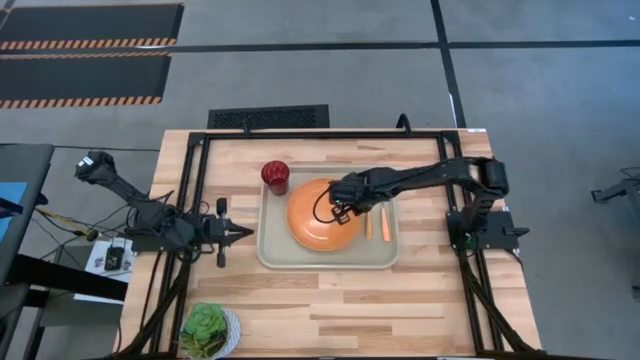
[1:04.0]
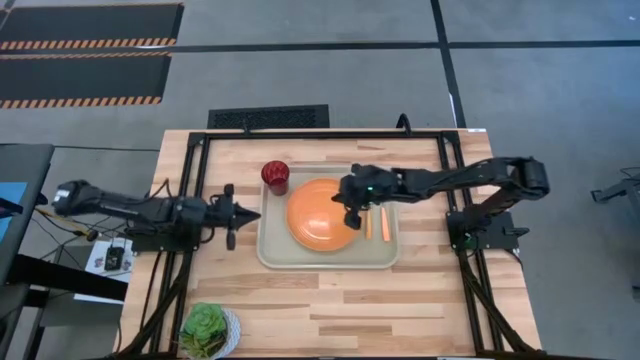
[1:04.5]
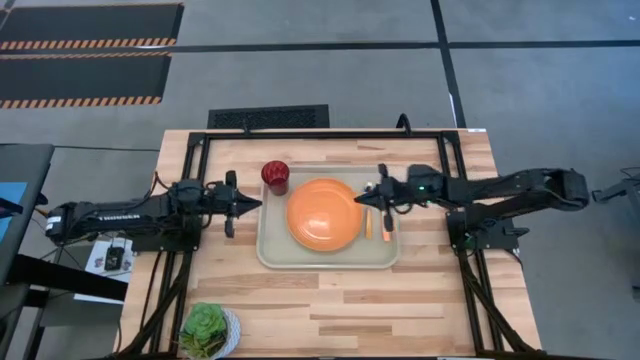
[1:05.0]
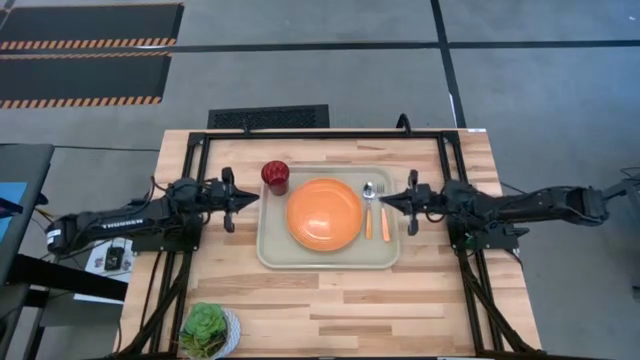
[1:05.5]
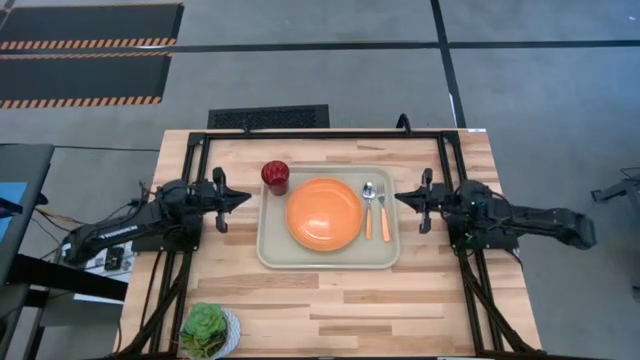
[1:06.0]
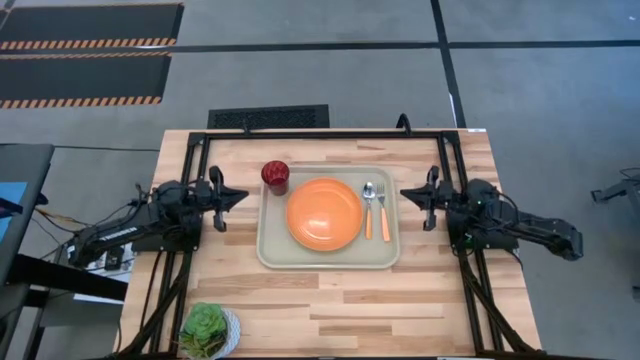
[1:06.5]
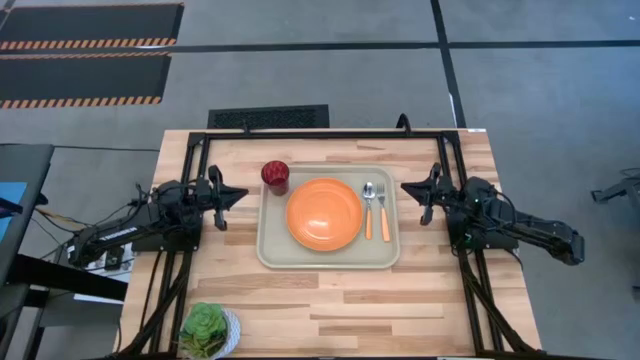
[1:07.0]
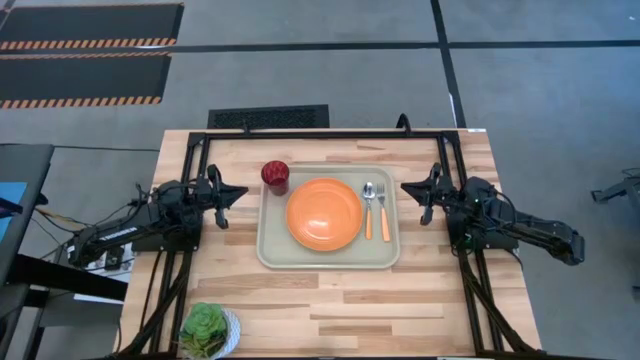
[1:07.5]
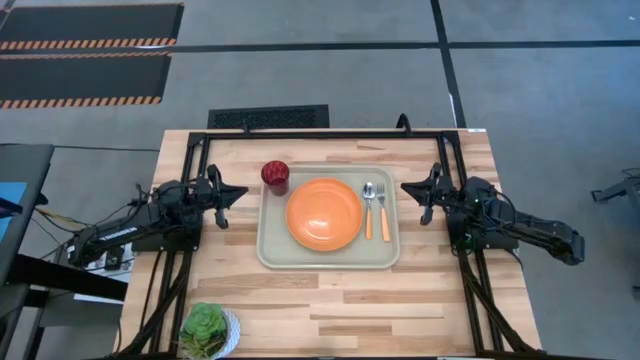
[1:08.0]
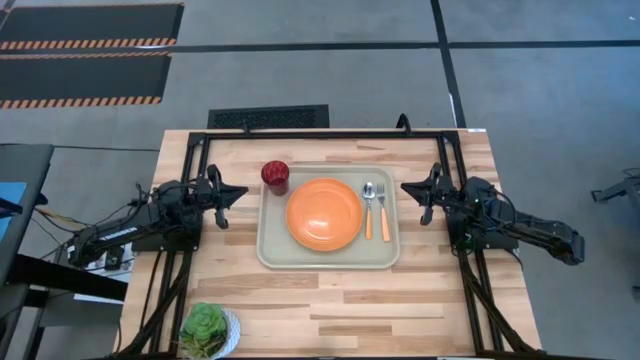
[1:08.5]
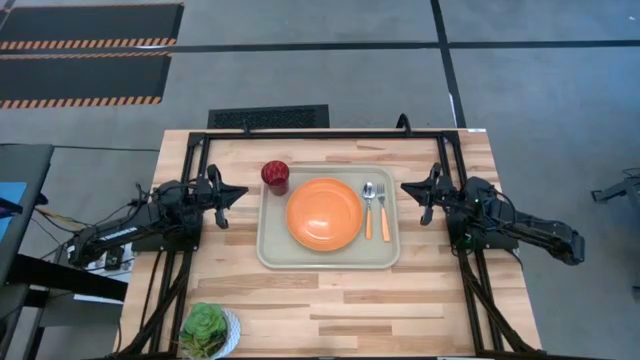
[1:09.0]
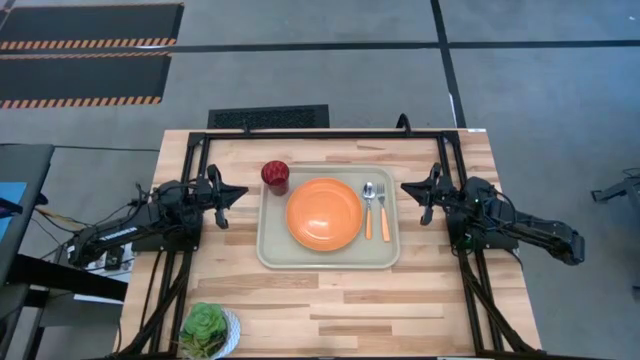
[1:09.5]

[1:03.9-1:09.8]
Task: Pick and place plate/cup/fork/spoon on tray
Return to Home Position

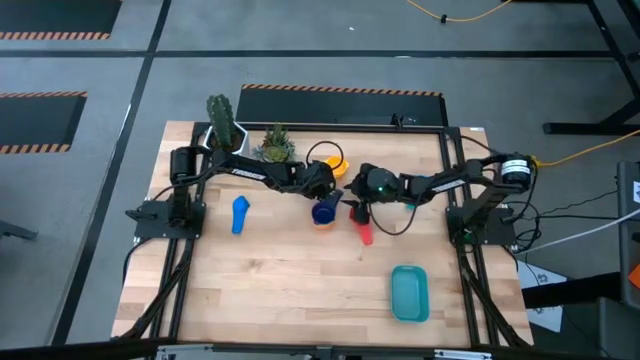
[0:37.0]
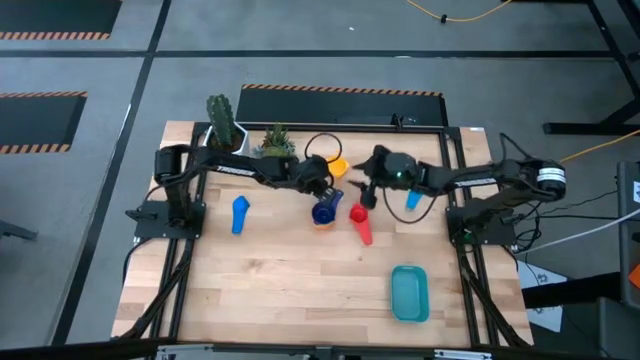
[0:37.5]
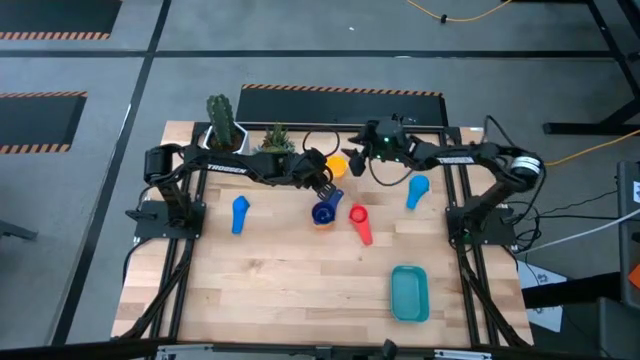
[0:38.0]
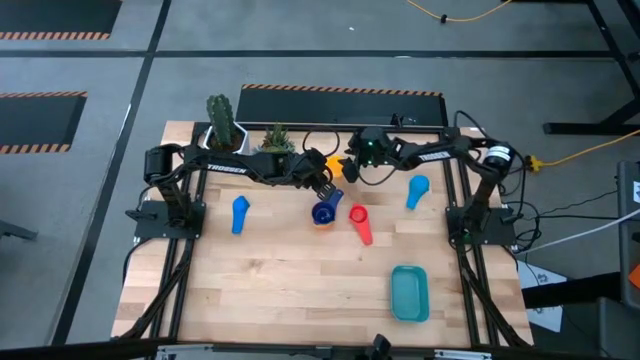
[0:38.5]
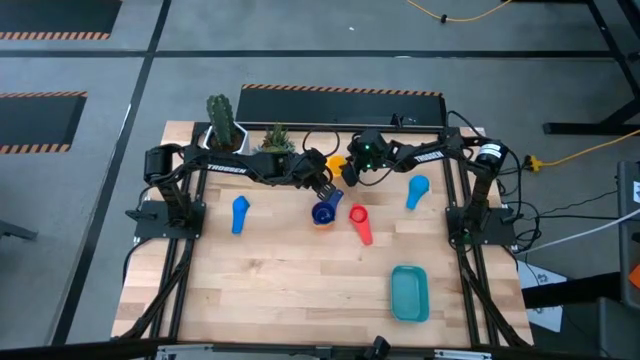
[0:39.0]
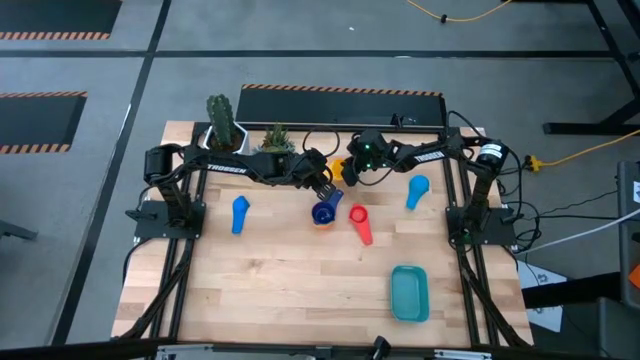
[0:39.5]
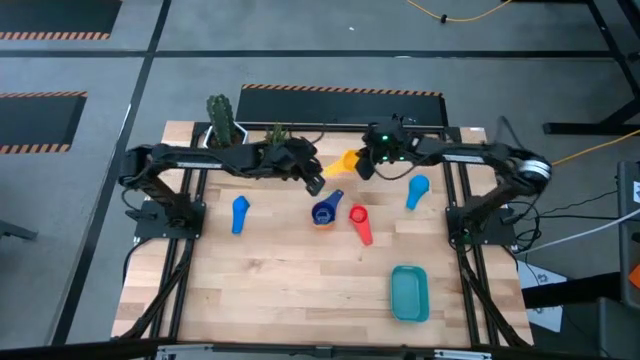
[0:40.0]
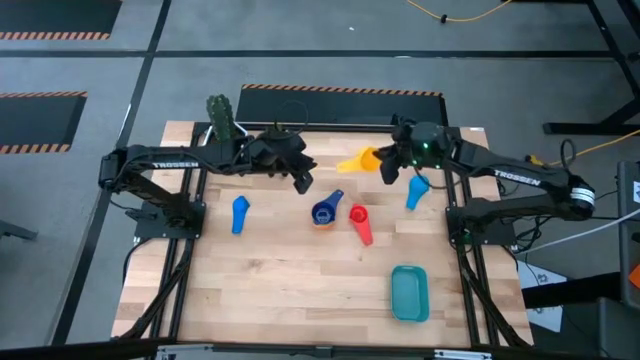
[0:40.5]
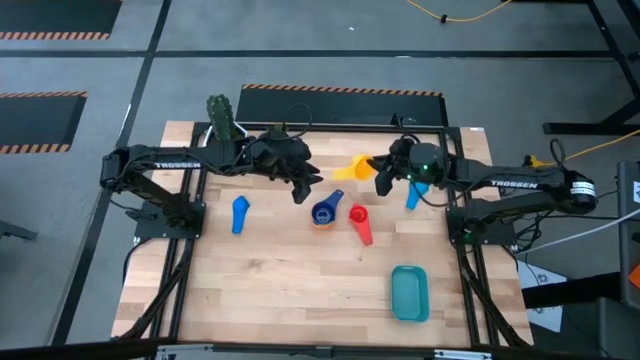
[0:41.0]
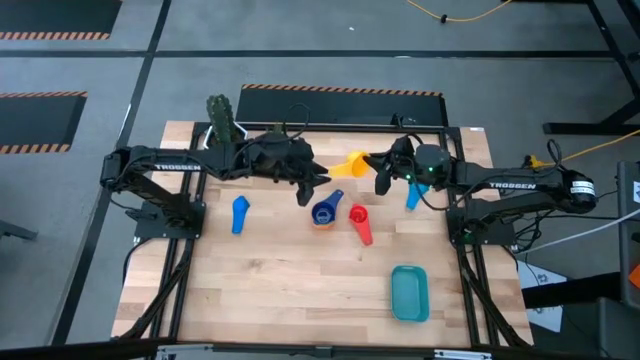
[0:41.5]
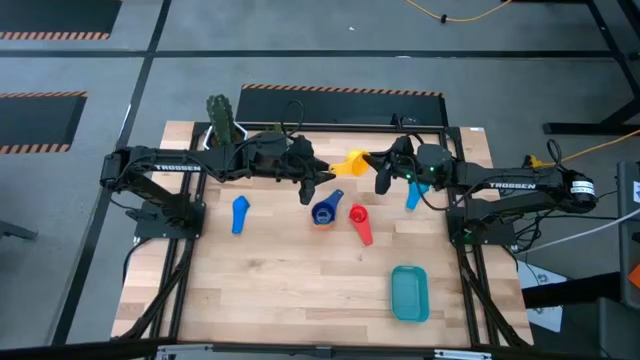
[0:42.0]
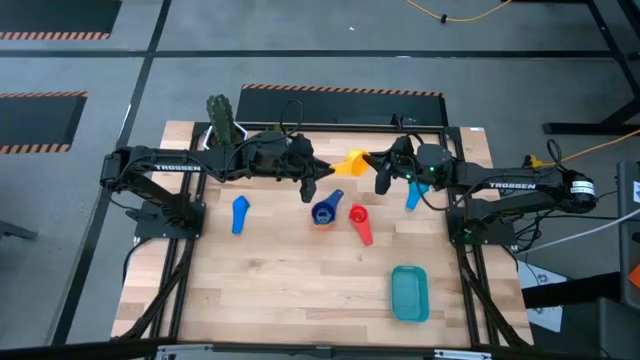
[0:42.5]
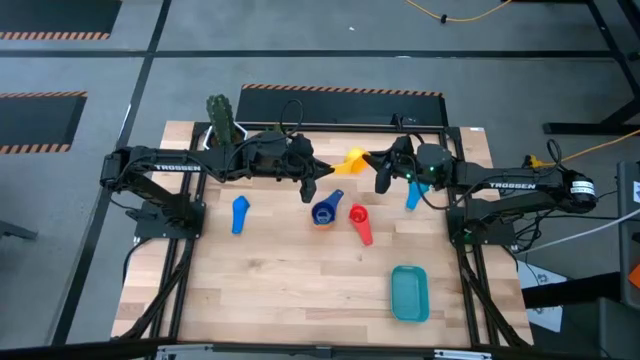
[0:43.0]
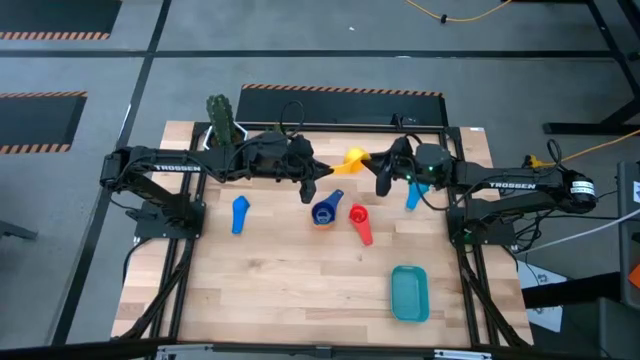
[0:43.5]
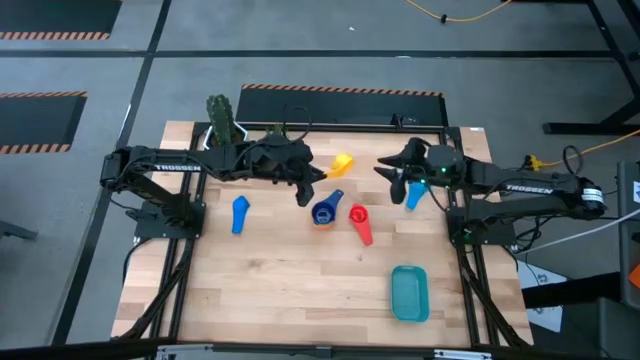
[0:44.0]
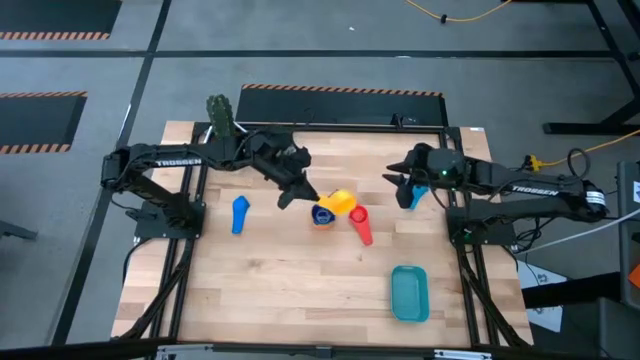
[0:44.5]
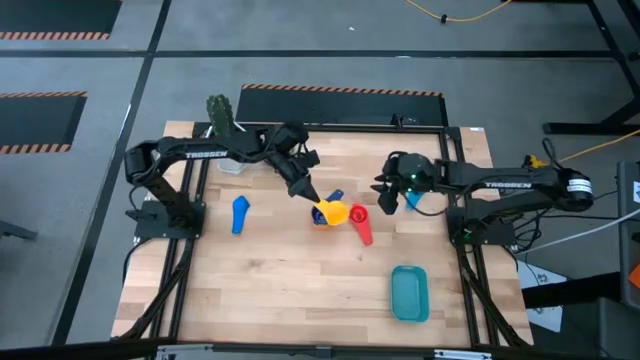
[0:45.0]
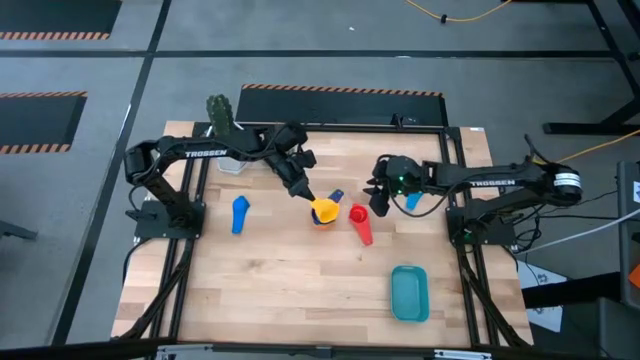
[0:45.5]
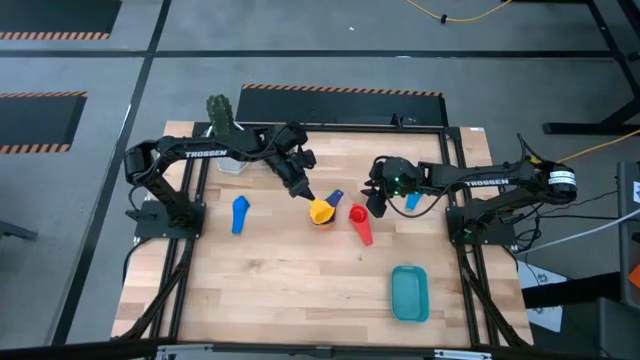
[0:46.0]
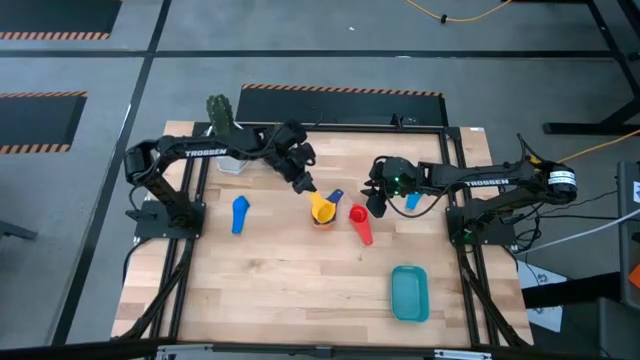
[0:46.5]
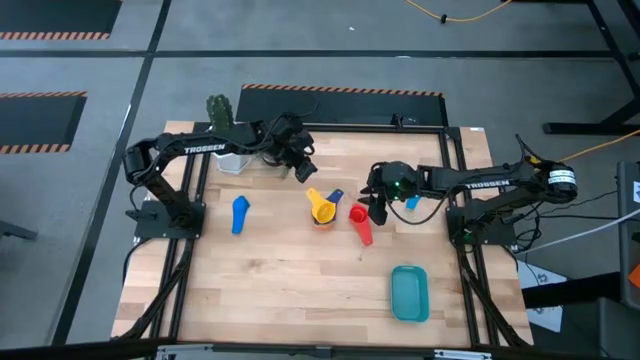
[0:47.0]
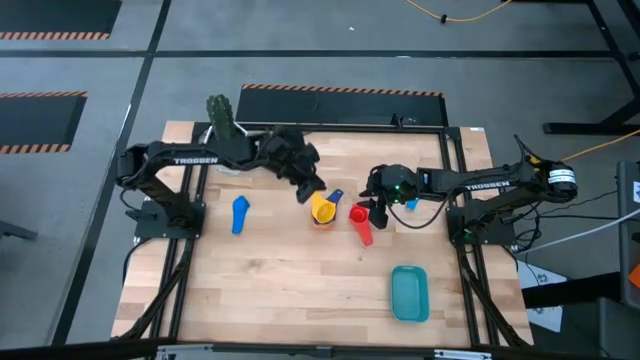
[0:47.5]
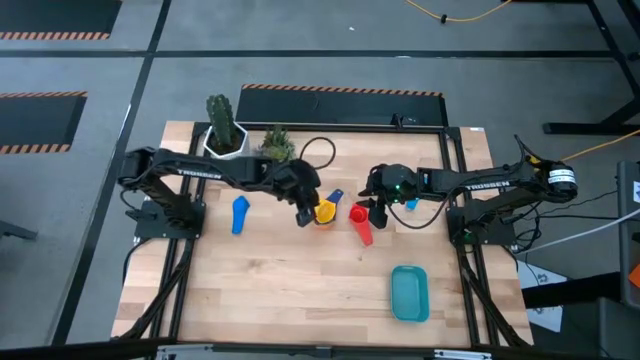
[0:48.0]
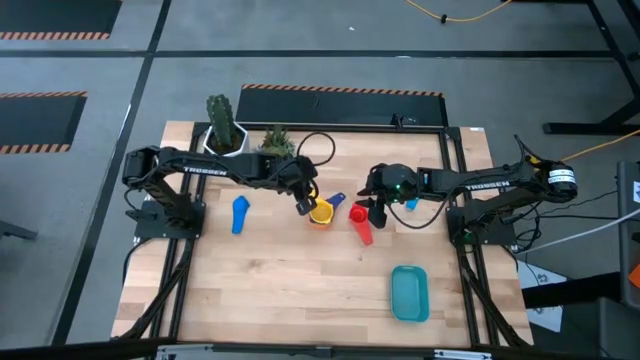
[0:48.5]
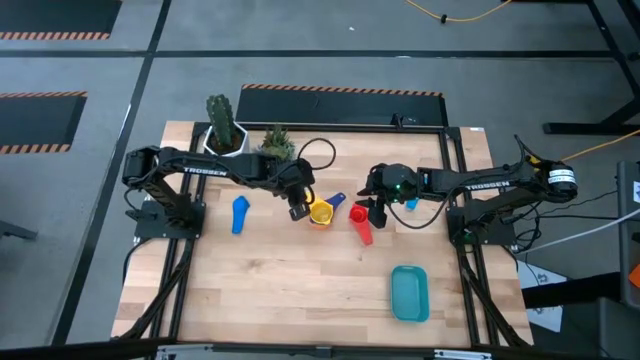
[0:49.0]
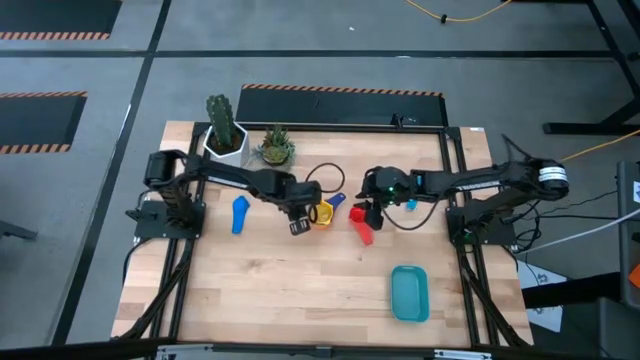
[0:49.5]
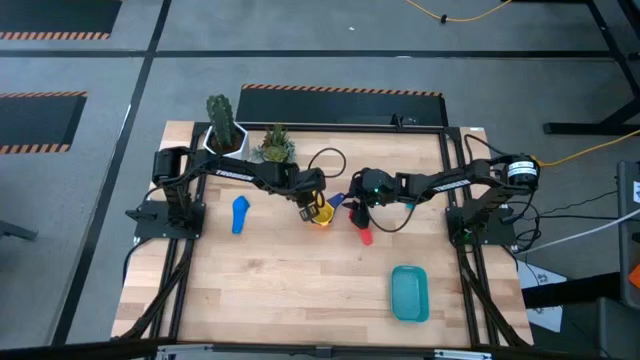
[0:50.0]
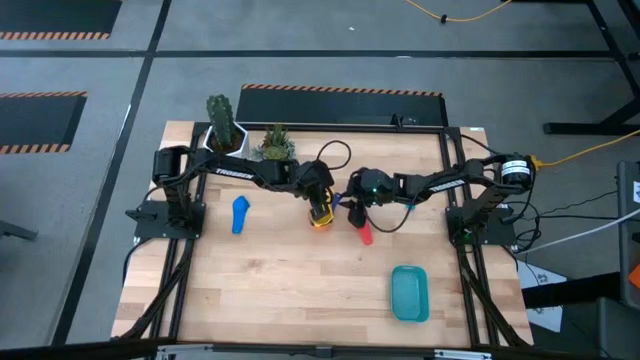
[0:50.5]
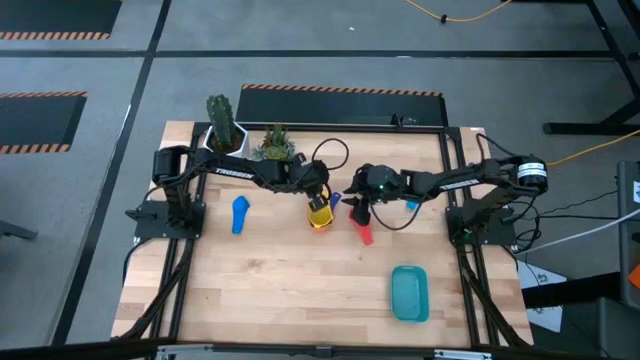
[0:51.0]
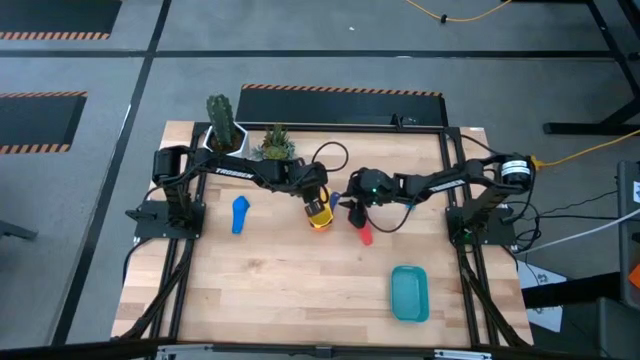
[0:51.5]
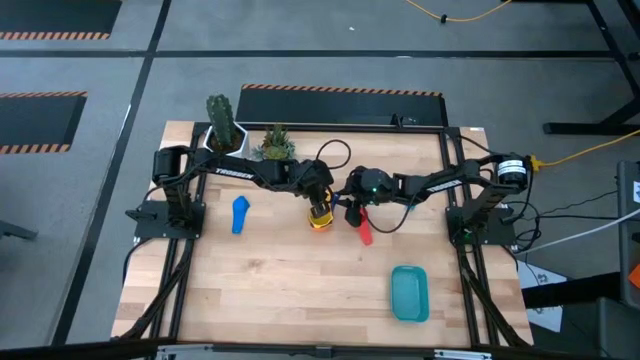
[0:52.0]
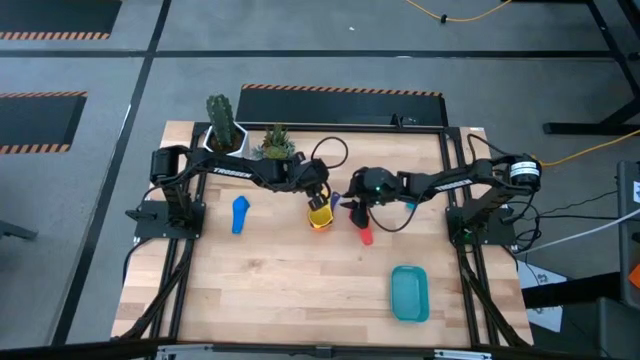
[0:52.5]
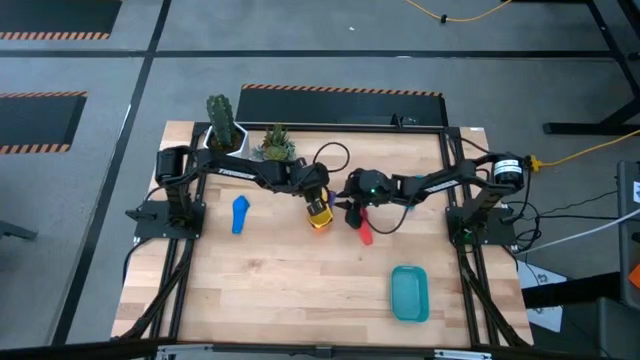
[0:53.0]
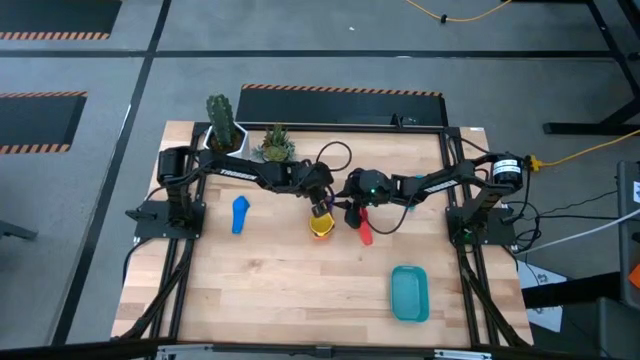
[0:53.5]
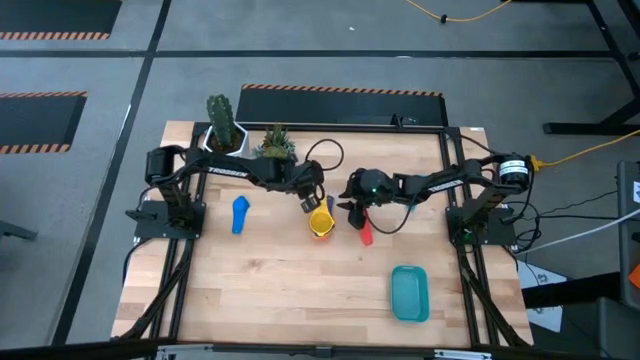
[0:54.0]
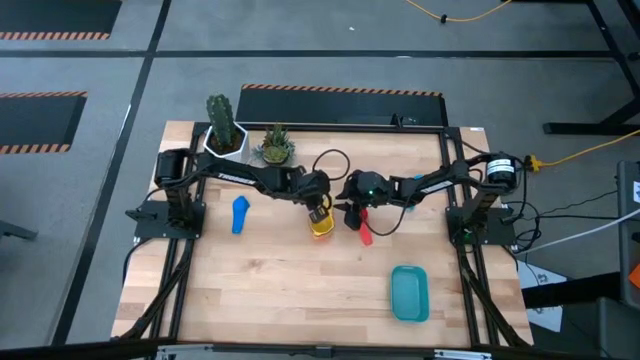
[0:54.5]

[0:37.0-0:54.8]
Task: Nest measuring cups in basket
Stack the yellow measuring cup on top of the dark blue measuring cup
